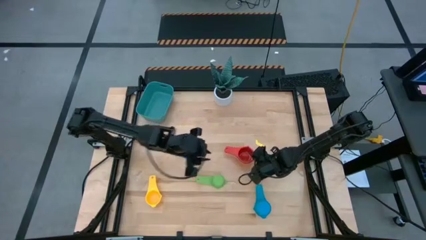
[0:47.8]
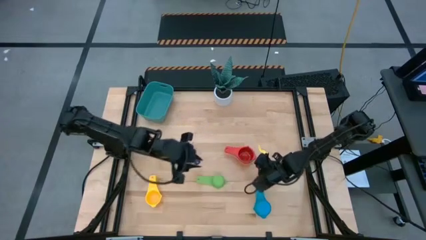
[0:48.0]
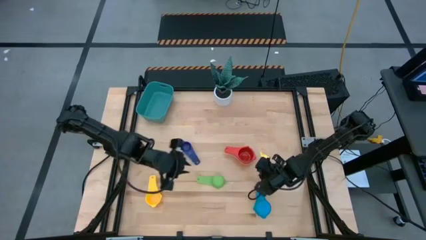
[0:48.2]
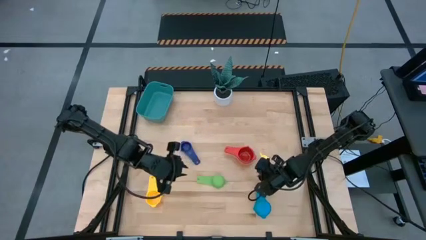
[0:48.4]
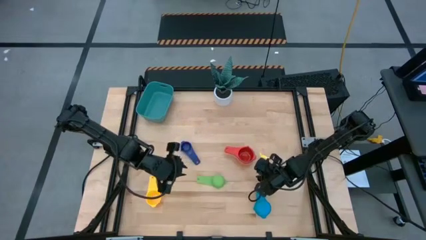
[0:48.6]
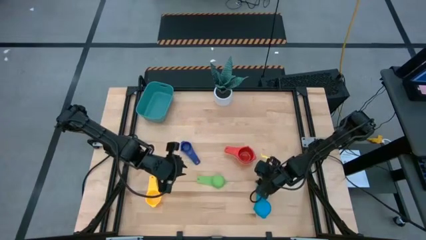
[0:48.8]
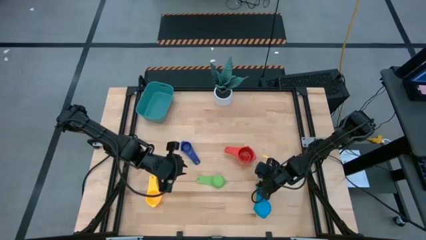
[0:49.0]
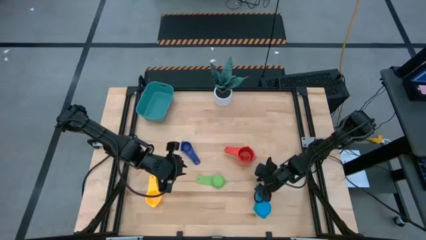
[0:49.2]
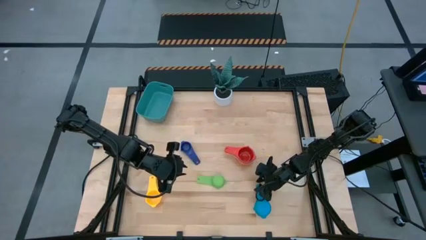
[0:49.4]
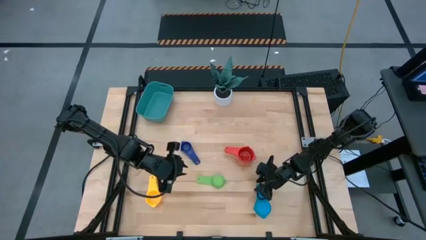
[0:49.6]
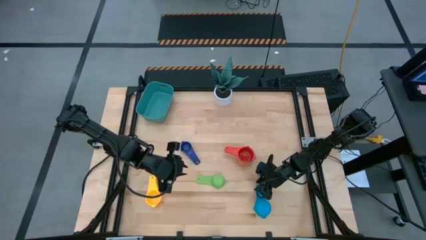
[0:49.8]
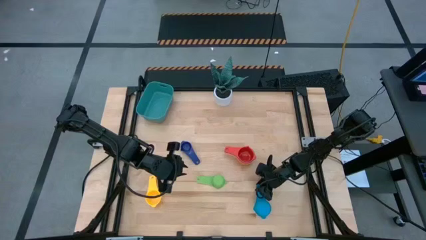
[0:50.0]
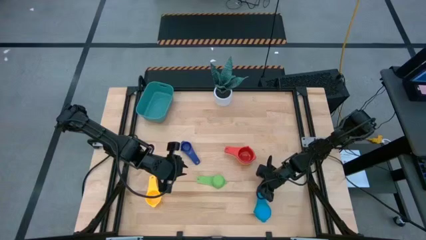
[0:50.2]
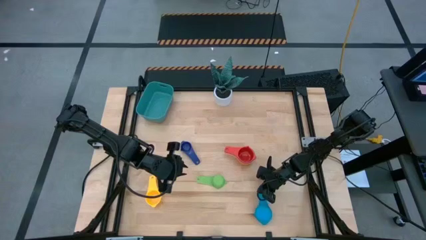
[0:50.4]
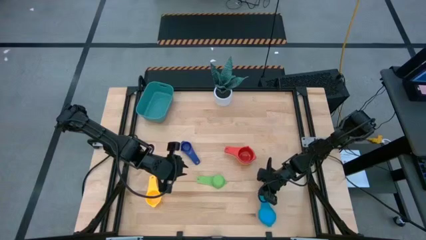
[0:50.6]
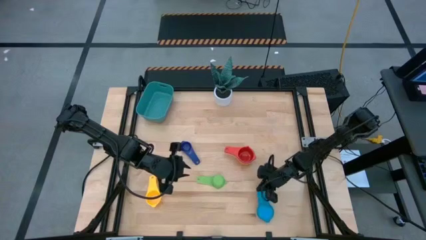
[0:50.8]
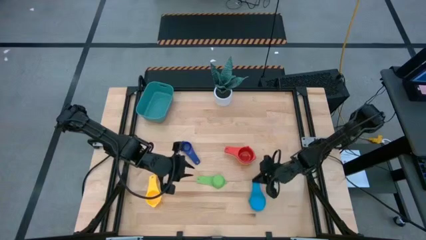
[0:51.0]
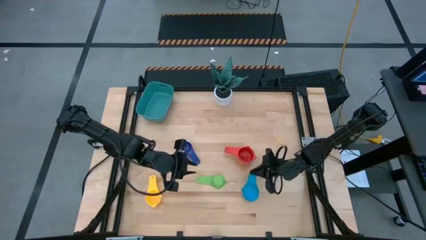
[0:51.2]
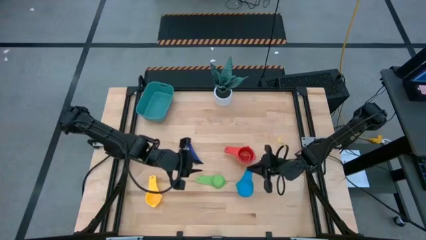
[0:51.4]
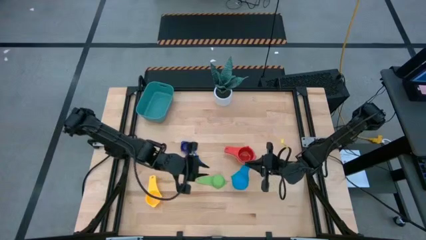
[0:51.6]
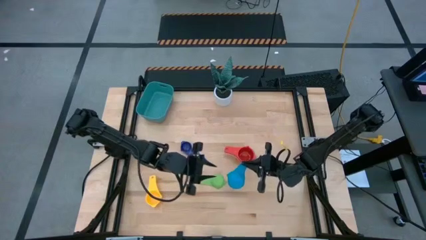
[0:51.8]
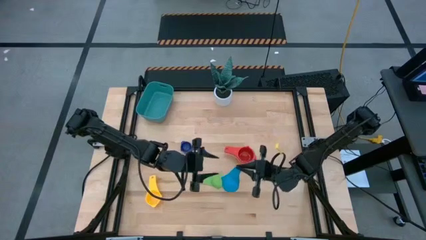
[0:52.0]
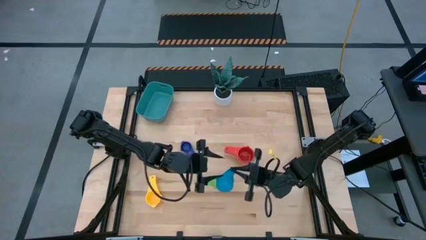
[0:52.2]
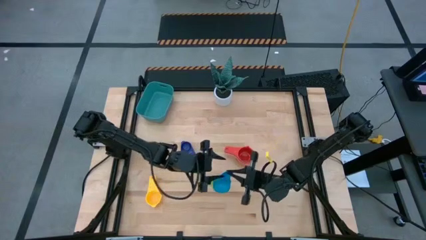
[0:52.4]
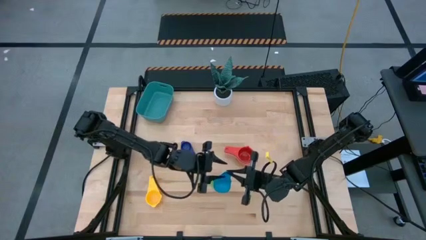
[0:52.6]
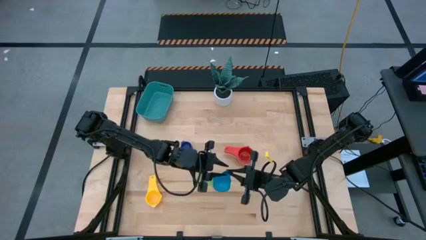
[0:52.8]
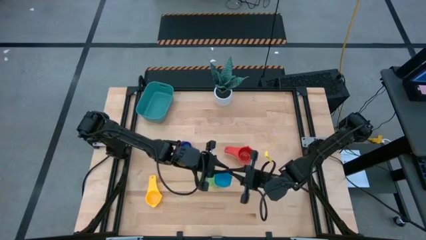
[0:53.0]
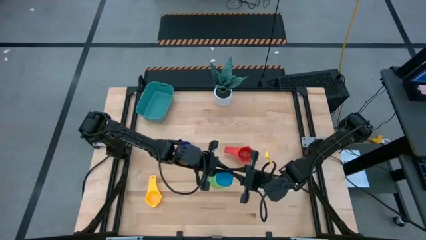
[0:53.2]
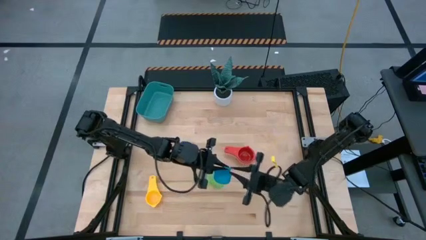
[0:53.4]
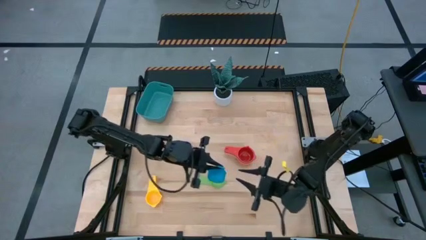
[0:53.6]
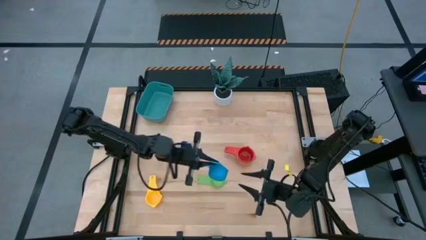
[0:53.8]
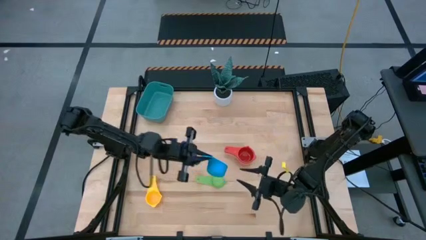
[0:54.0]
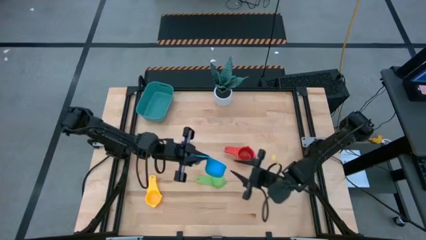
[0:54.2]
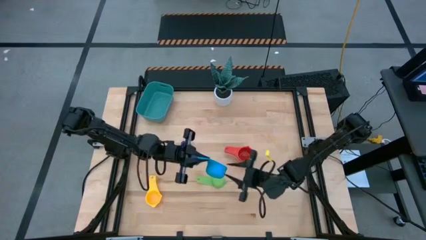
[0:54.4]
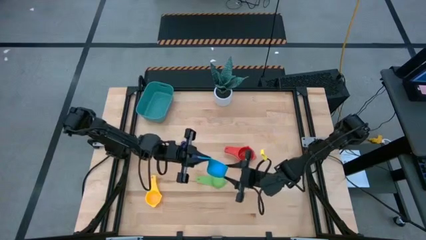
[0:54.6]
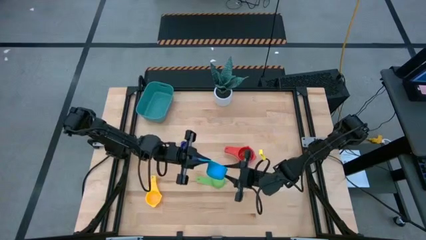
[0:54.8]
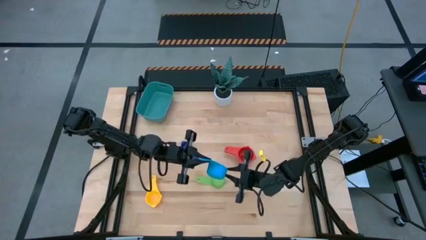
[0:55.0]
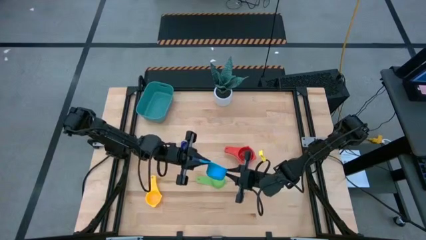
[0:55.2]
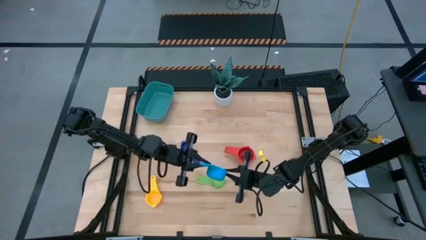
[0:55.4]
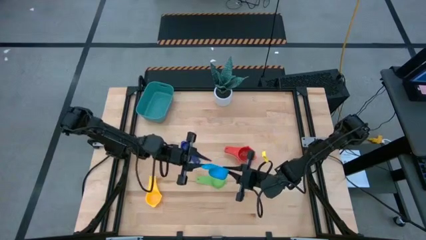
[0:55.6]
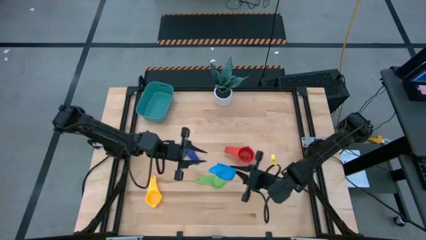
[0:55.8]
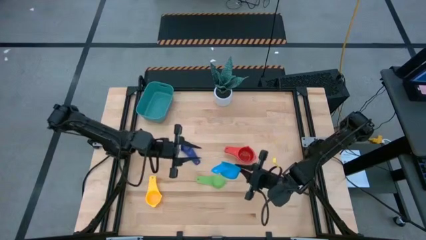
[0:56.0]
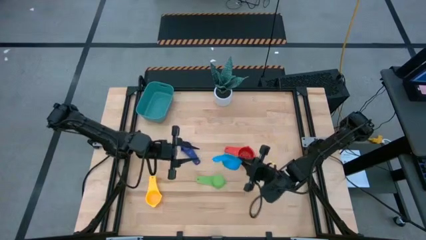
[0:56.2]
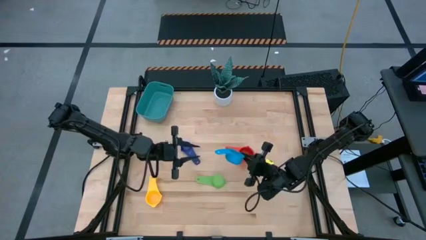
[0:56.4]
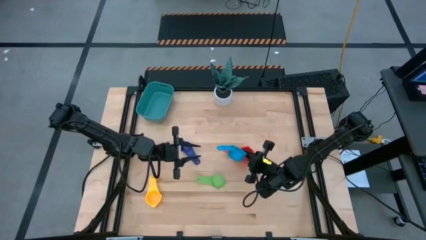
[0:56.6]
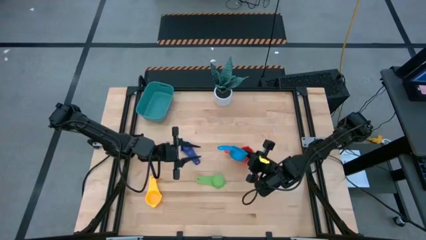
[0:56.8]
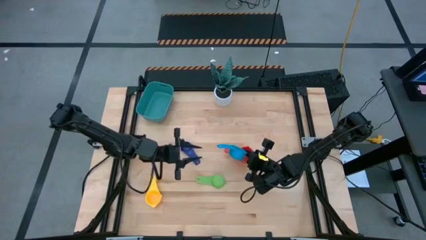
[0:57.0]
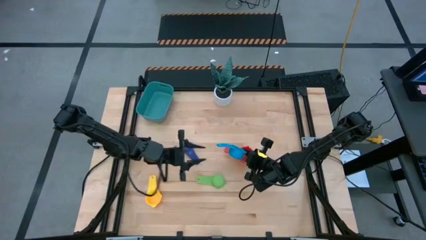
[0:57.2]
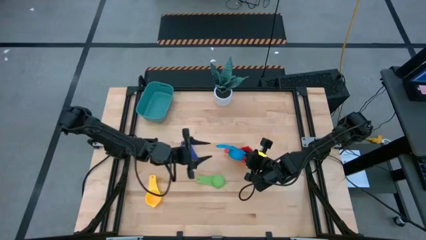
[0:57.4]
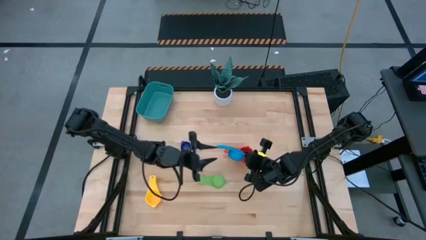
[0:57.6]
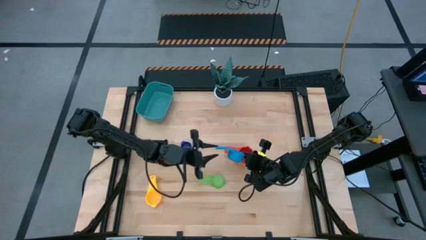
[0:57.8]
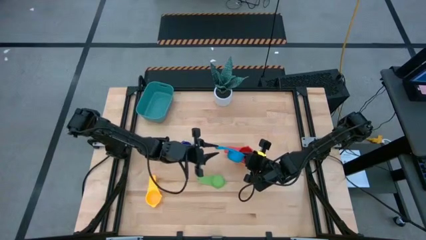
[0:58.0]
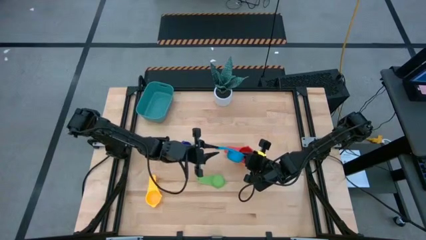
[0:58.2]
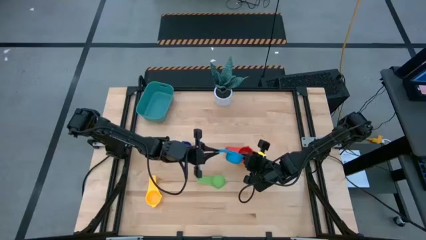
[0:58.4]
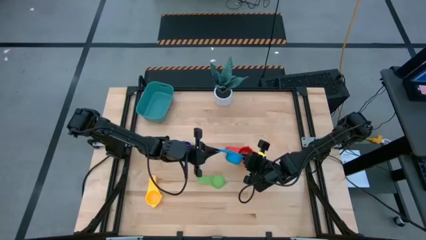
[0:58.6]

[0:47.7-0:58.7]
Task: Nest measuring cups in basket
Stack the light blue measuring cup on top of the orange measuring cup

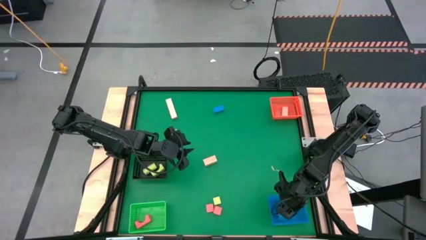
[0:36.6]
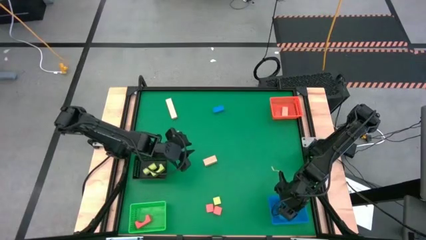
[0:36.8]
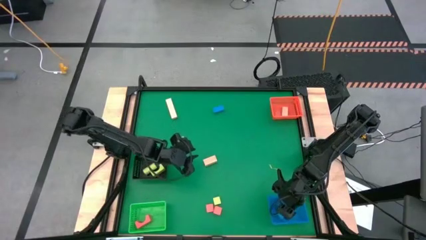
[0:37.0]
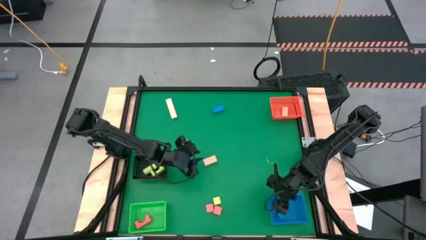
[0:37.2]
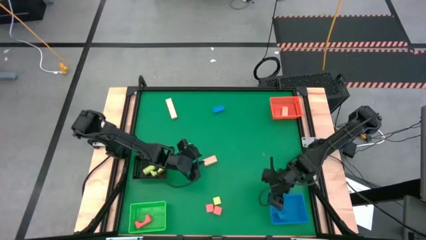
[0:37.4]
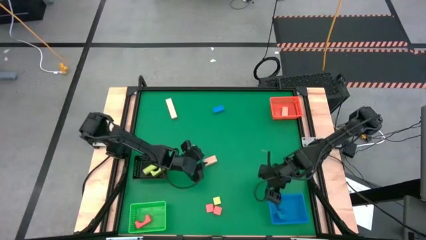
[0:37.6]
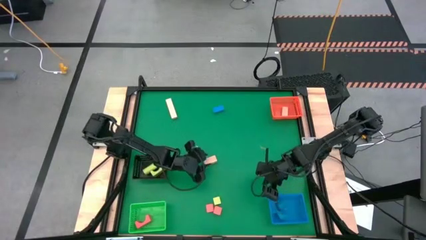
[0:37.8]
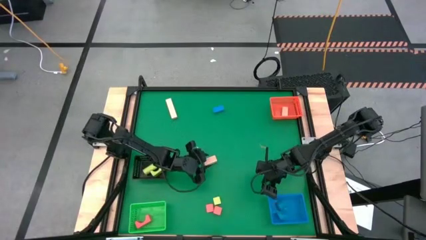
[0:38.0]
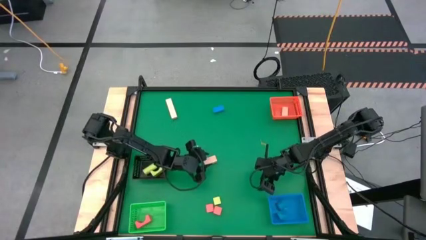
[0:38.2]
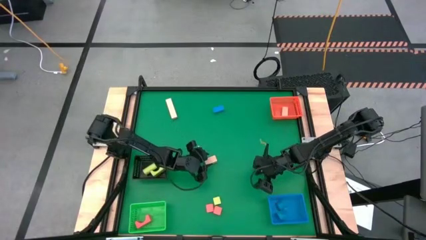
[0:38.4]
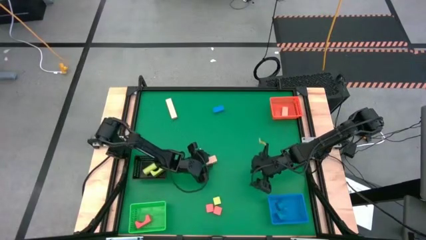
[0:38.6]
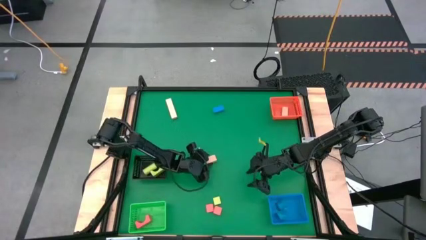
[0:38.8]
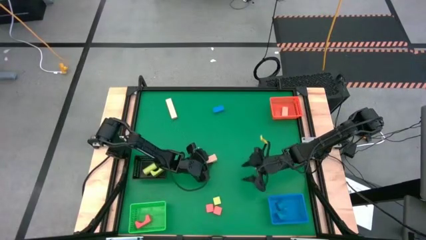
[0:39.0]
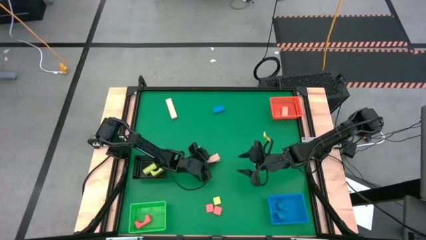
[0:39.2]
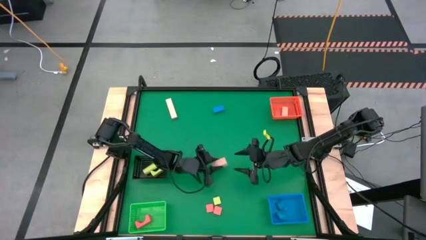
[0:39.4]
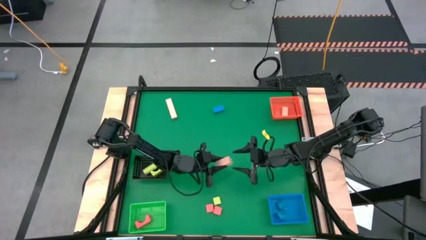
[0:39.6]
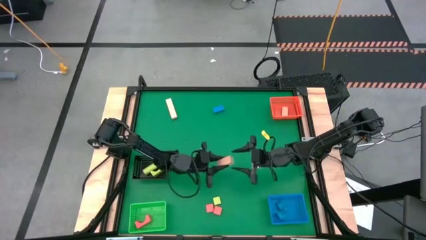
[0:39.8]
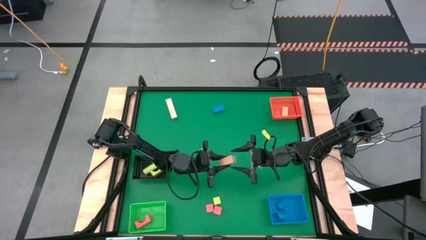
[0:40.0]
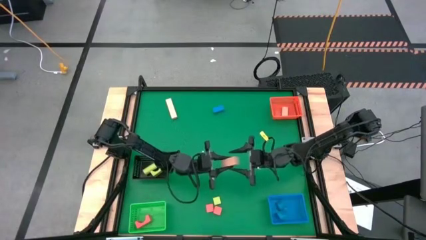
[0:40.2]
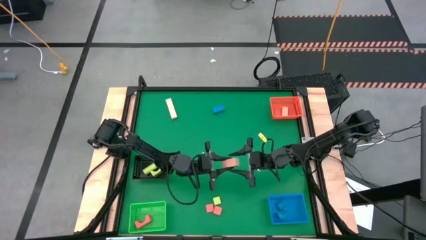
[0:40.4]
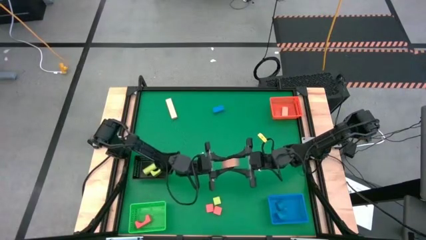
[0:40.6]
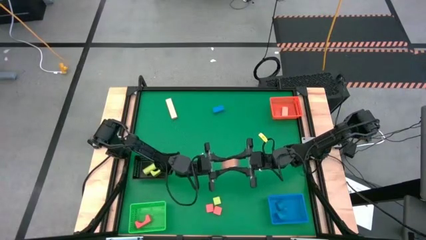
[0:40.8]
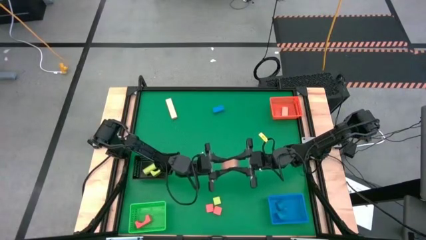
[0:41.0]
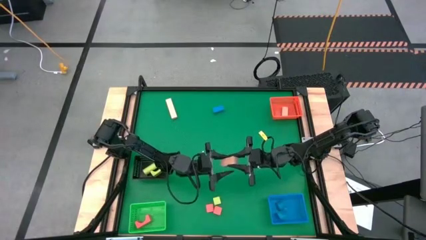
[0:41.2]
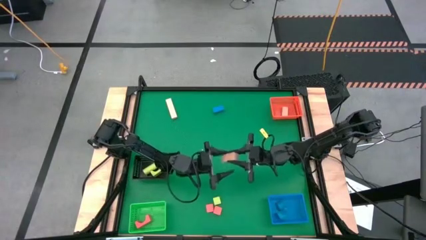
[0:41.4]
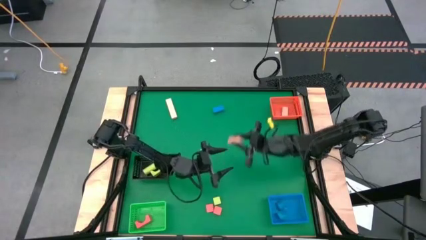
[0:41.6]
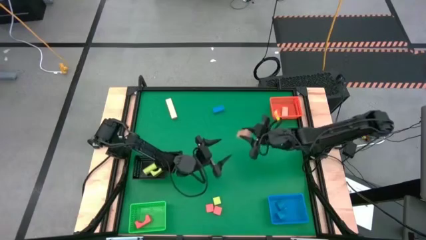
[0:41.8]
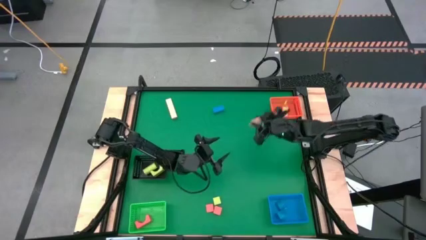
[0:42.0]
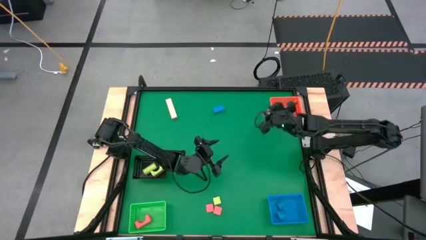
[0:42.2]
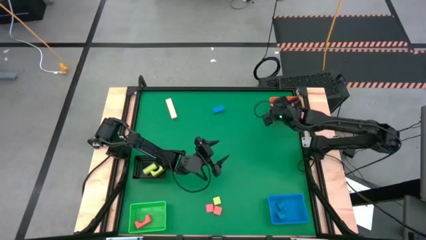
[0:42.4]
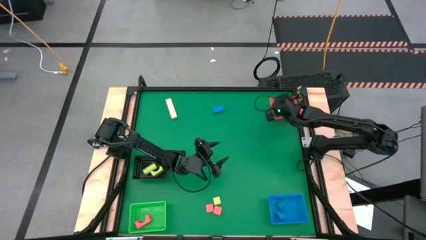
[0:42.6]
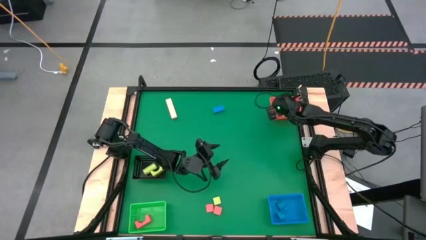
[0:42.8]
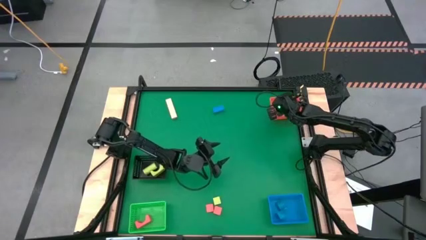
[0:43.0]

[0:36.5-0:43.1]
Task: Sort & place blocks by color
Put the bottom white wooden block into the orange basket
